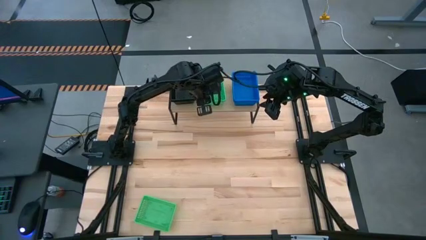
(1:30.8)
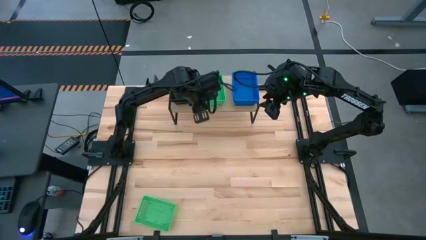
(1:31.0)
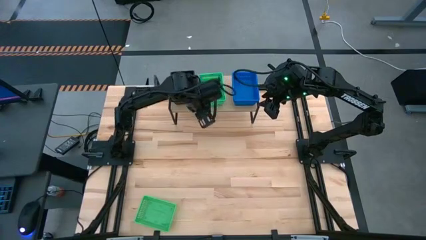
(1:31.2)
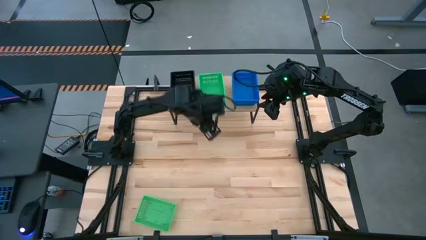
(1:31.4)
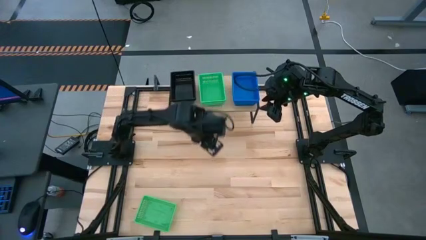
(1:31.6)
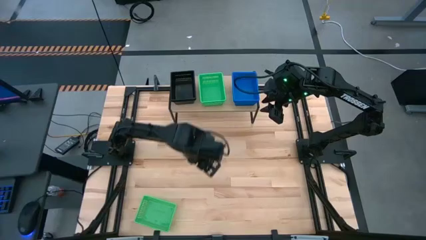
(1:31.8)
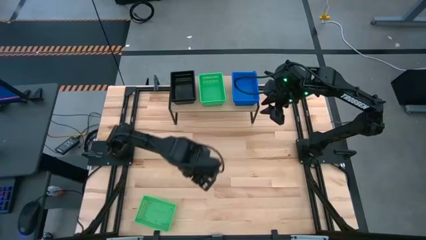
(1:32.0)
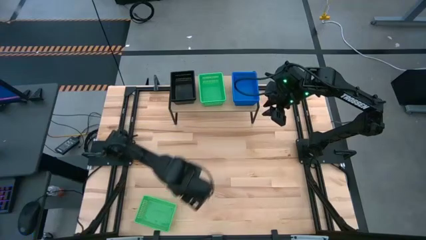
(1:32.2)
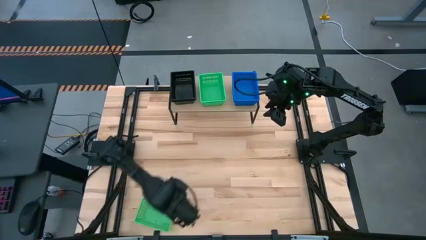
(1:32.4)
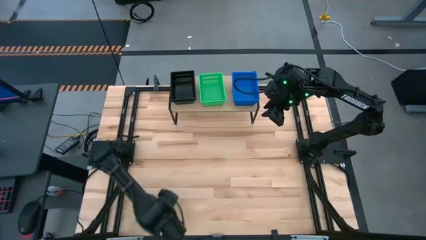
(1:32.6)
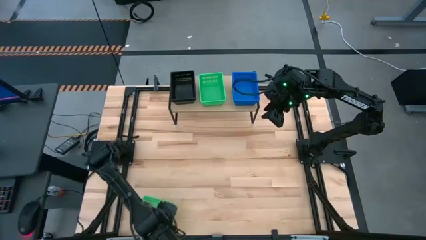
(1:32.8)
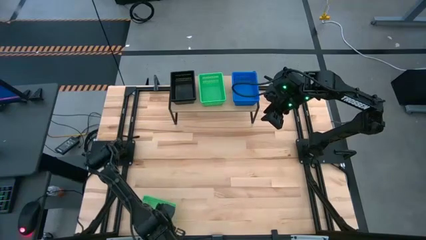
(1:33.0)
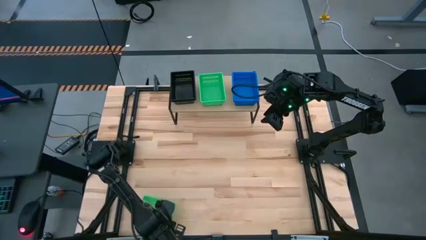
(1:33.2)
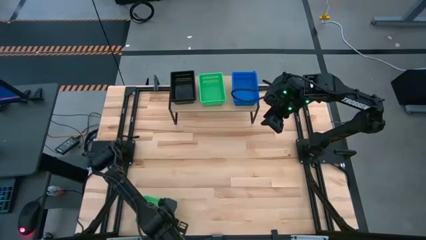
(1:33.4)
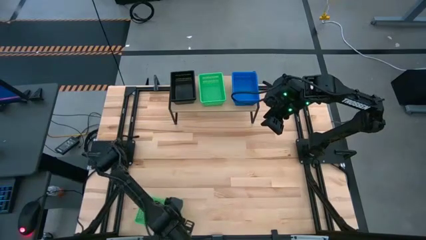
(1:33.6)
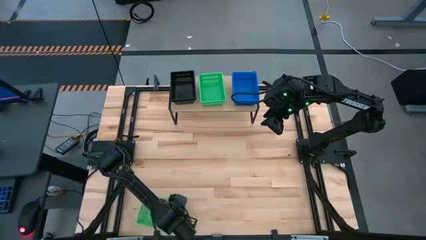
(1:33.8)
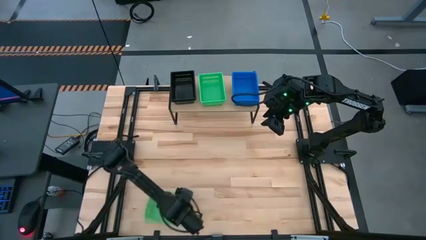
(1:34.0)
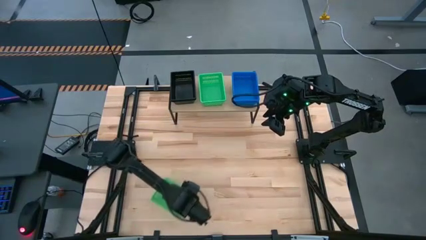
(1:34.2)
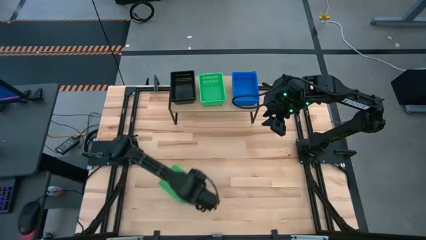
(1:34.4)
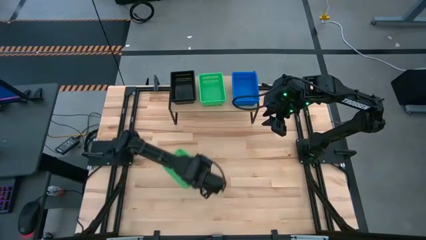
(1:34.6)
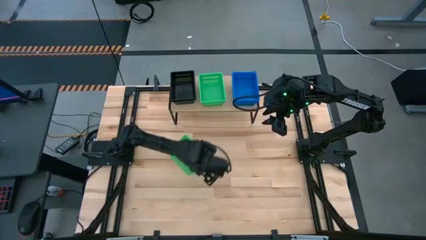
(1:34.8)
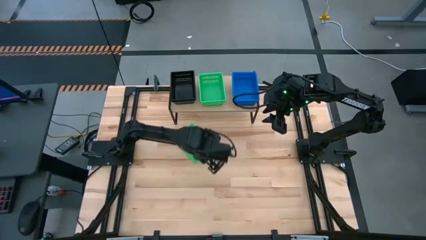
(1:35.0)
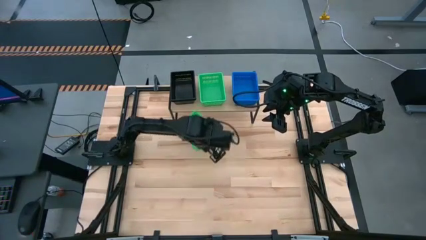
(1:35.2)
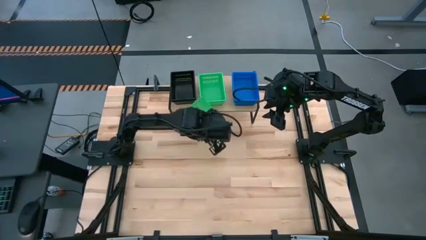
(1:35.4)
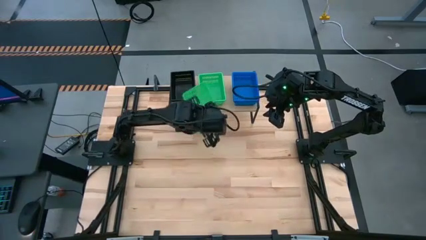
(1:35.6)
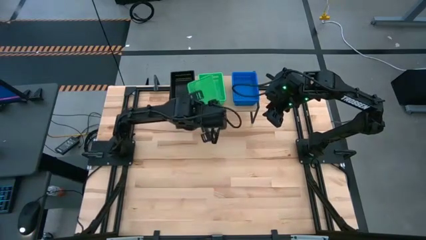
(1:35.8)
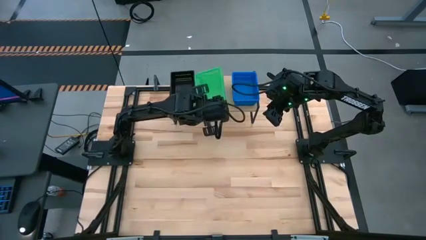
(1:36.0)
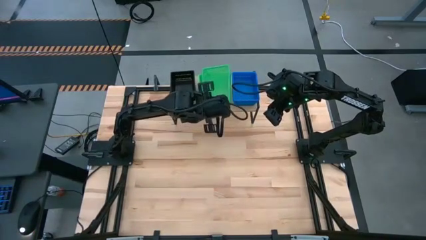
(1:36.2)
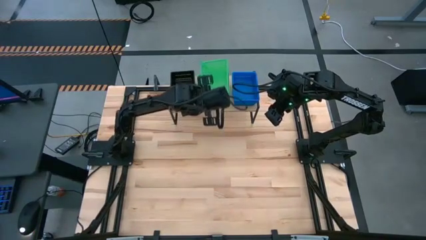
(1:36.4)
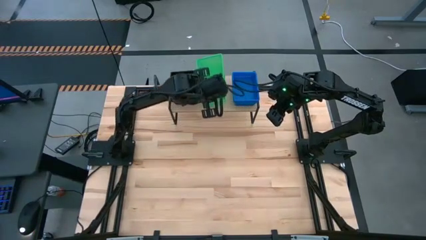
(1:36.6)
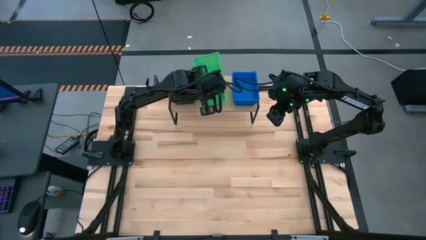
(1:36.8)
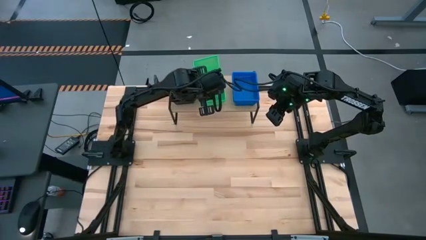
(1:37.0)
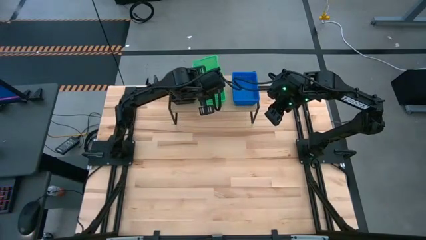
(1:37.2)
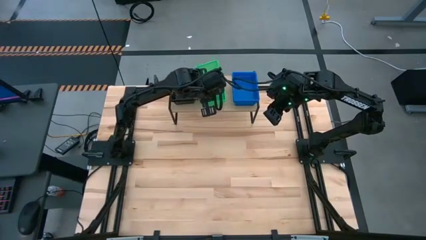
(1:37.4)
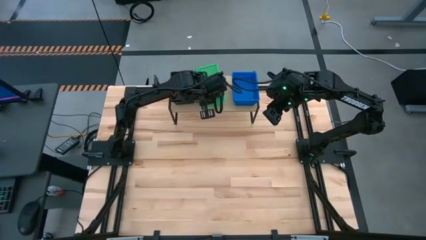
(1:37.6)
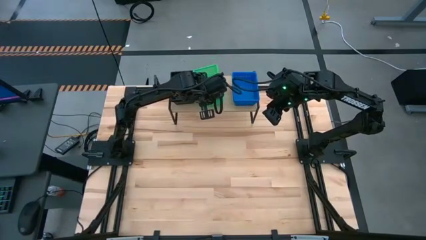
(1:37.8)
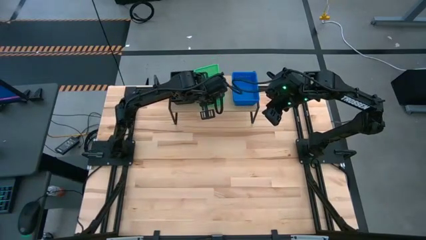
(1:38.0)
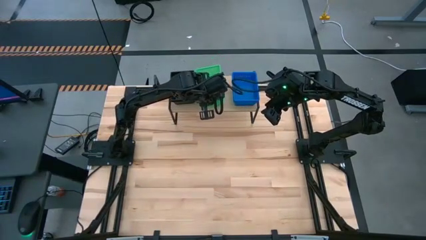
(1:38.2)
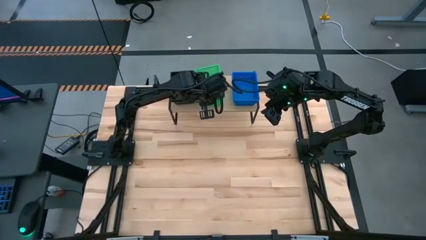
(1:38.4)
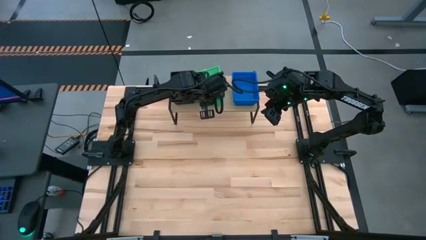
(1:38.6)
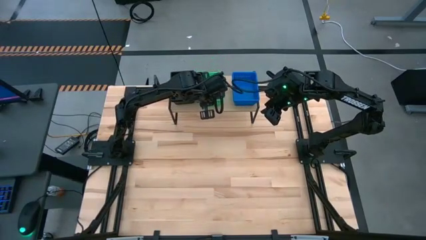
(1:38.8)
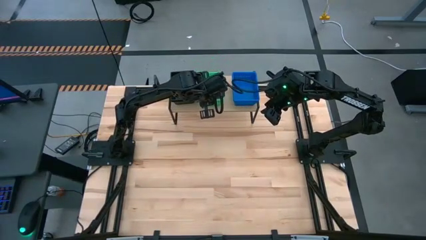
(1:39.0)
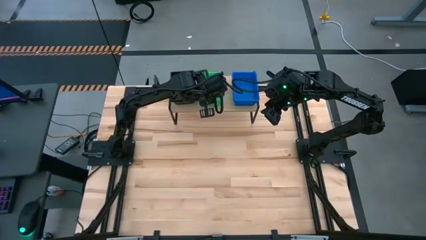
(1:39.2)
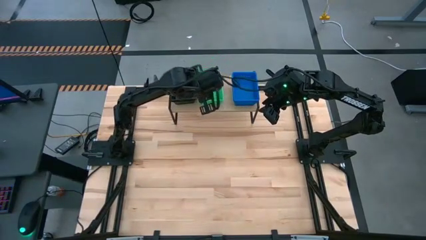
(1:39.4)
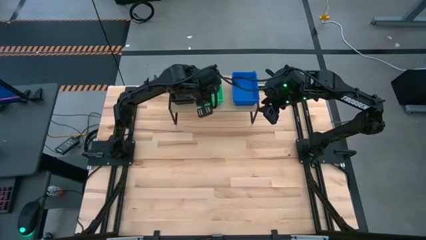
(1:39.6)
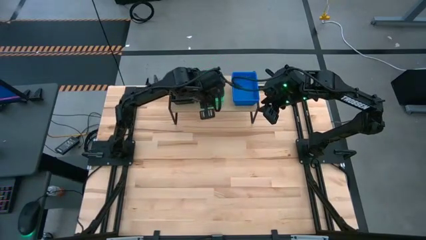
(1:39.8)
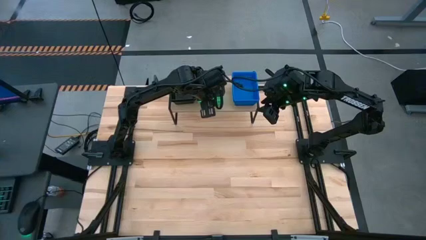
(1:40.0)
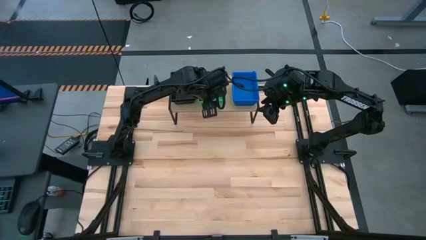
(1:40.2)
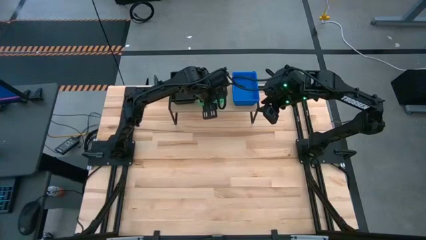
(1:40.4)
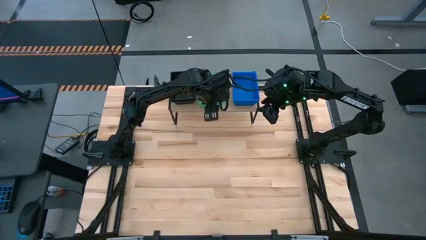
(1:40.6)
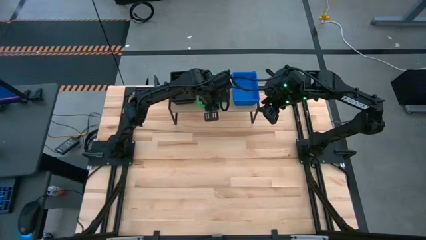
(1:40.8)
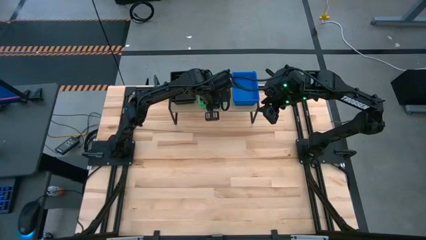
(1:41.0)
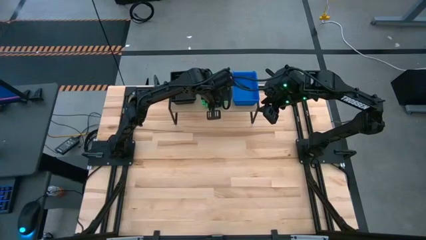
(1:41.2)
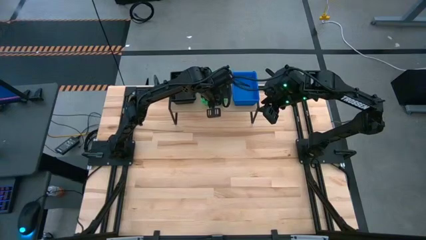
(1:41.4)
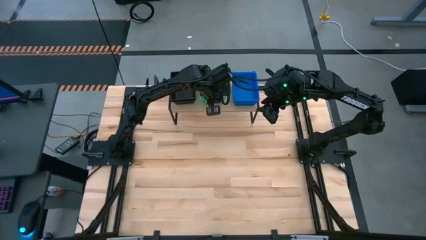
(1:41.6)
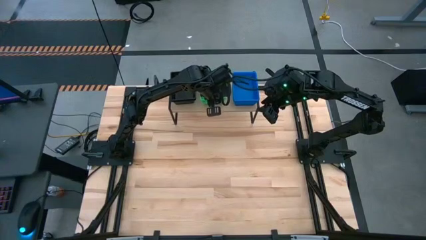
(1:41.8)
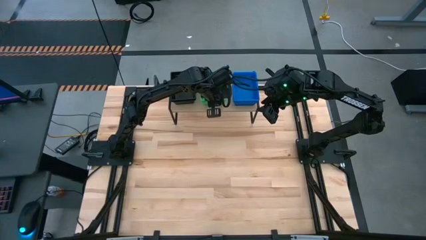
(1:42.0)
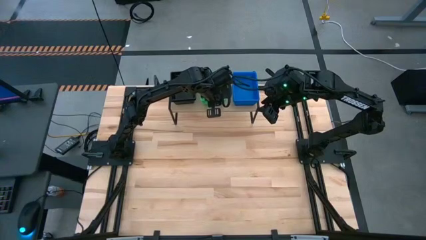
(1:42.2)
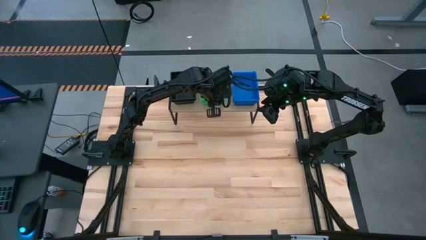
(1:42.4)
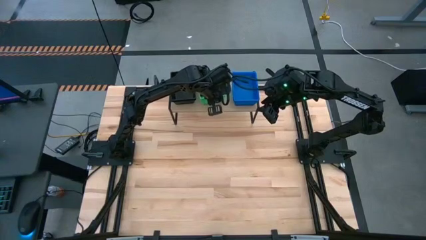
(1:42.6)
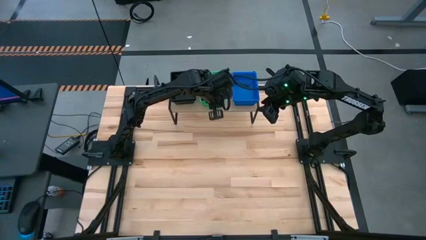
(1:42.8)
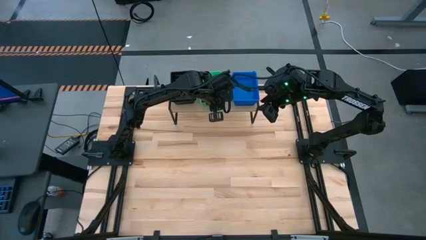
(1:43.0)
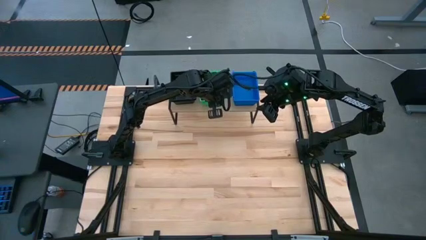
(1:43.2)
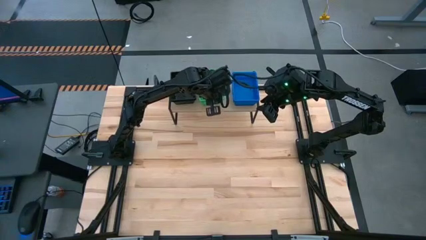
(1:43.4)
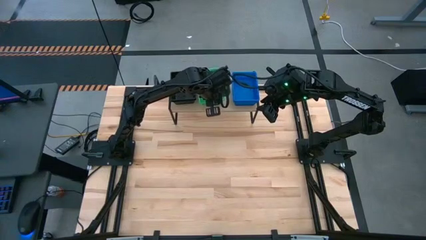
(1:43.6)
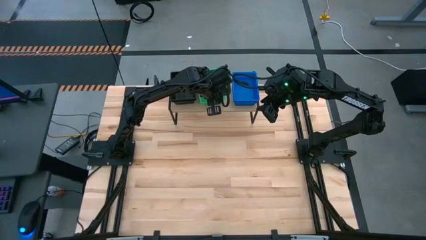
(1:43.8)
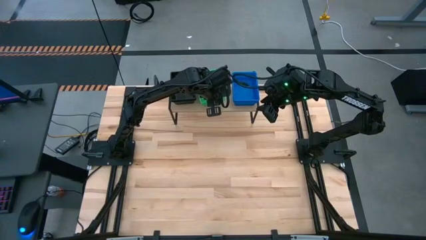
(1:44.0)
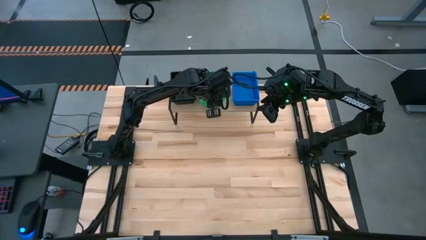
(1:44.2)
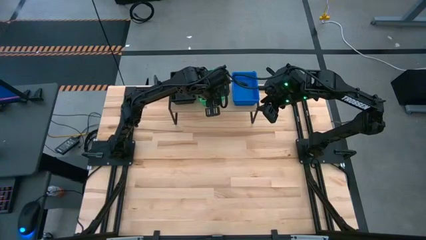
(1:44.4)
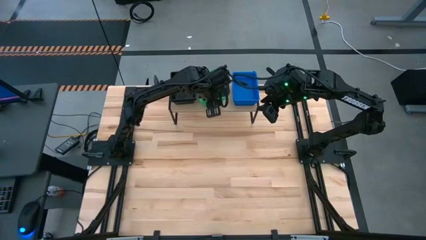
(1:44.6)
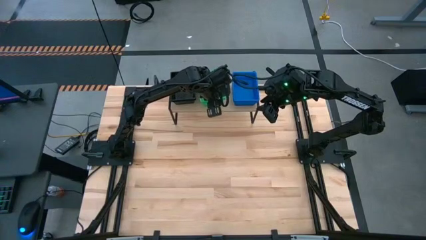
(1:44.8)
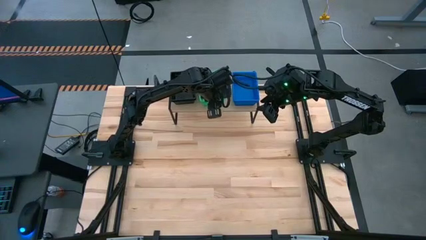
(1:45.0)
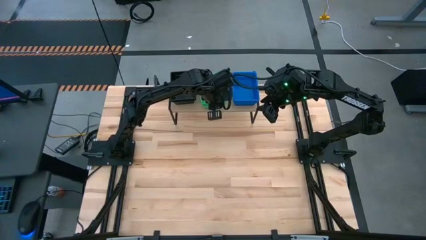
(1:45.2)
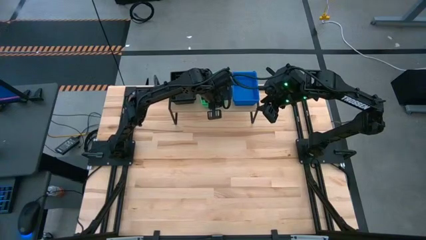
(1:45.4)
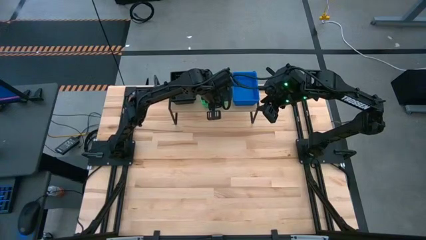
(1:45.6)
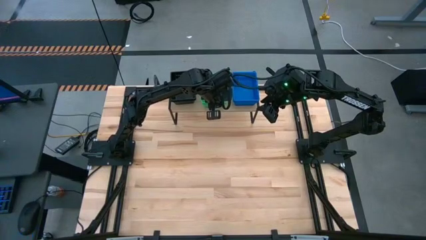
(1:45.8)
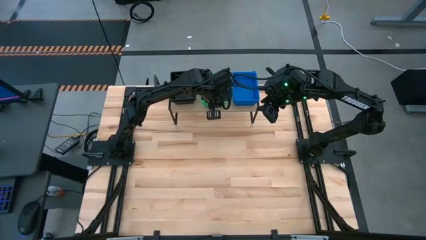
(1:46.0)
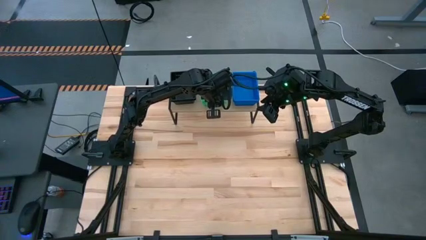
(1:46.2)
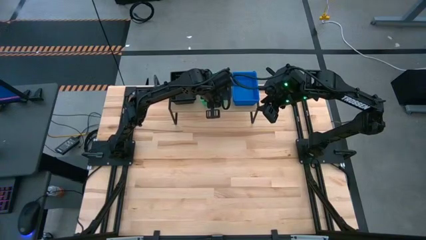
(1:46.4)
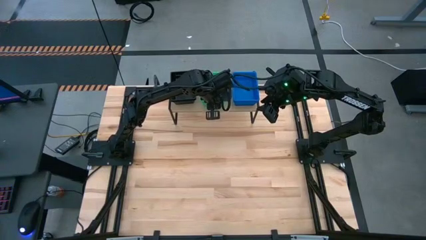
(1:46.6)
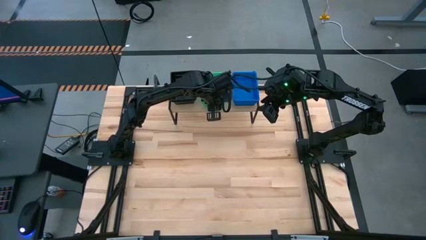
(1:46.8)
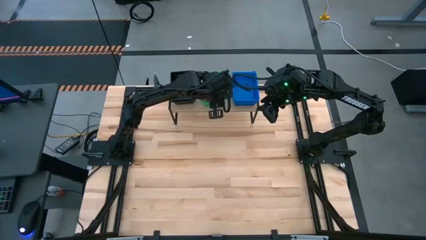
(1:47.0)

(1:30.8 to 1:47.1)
Task: Stack baskets on shelf by color
Stack the green basket on top of the other green baskets on the shelf
